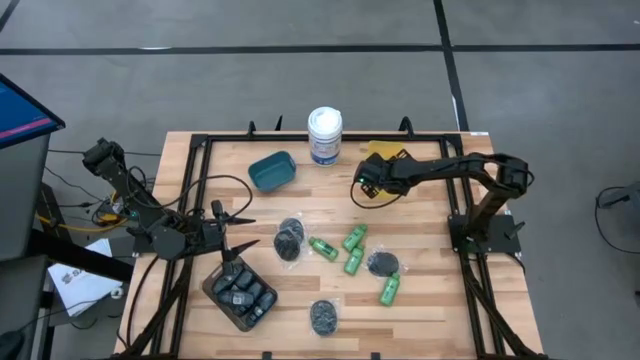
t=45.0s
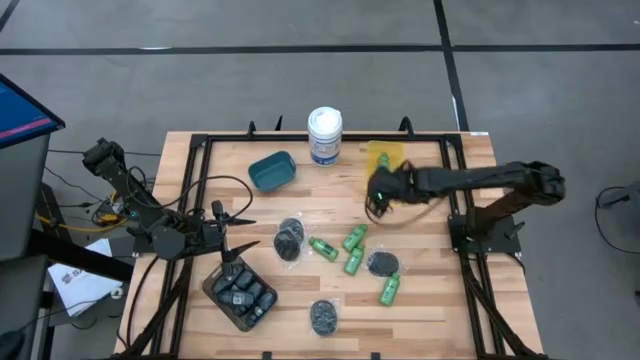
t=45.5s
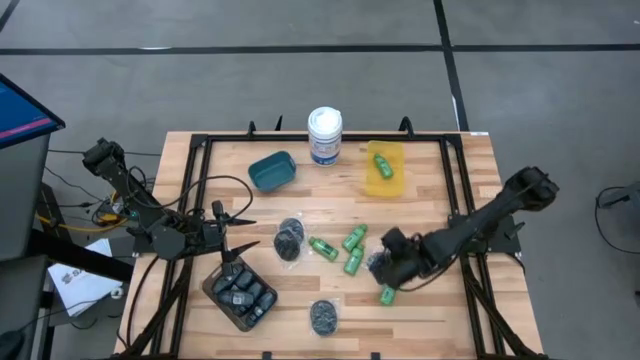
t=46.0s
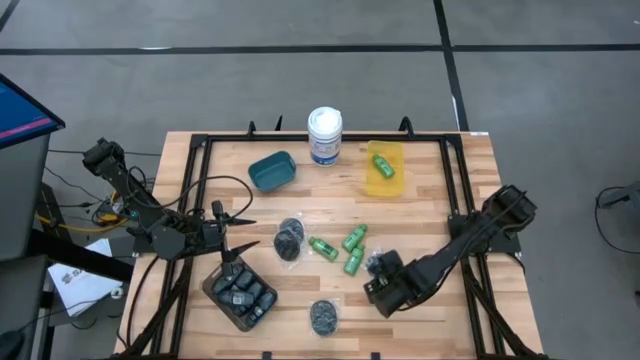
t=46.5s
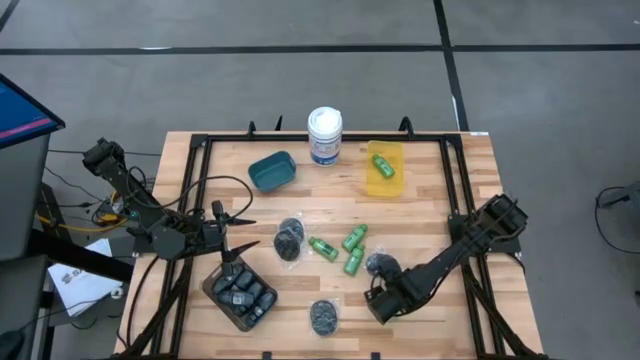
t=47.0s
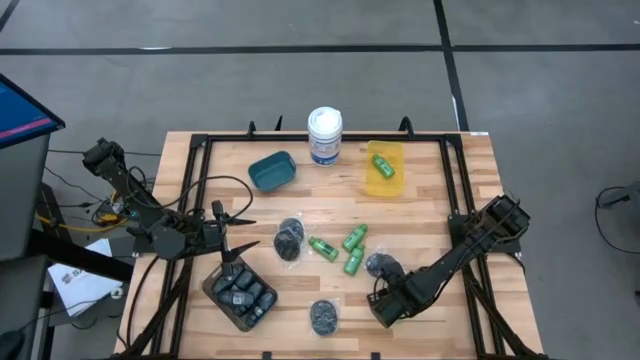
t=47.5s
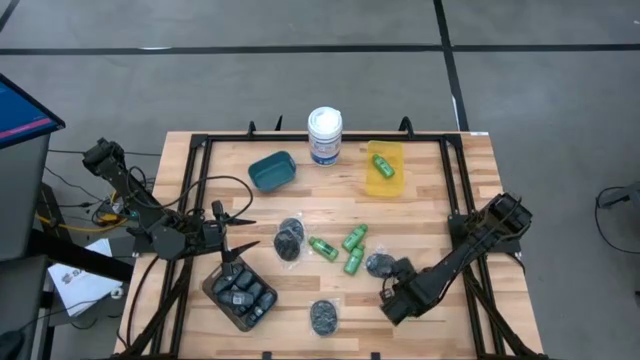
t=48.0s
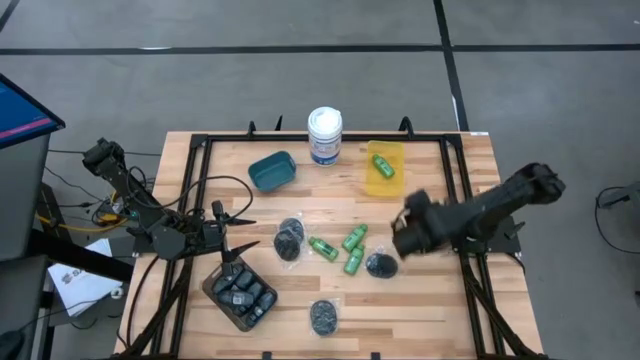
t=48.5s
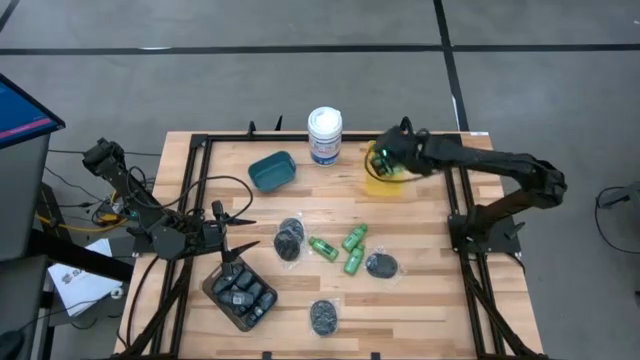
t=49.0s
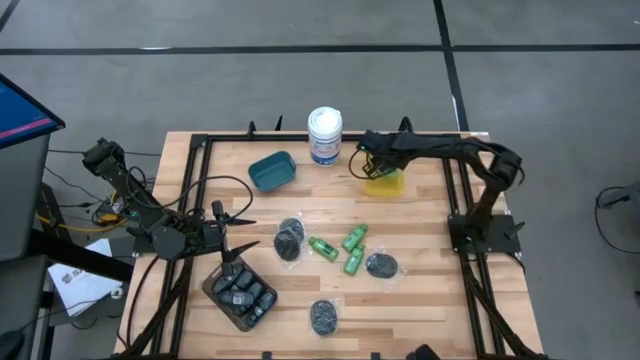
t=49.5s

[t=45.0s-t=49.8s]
Task: Pick & Place Travel size toiletries
Put the green shampoo bottle into the yellow bin

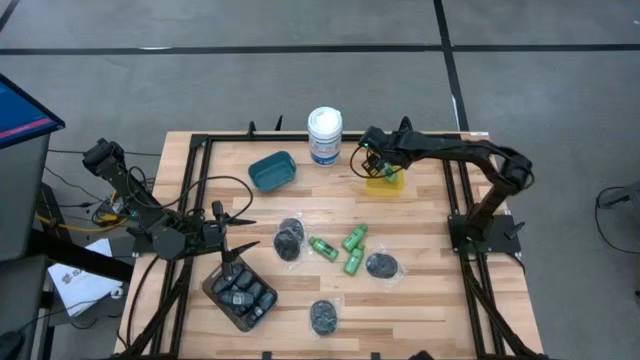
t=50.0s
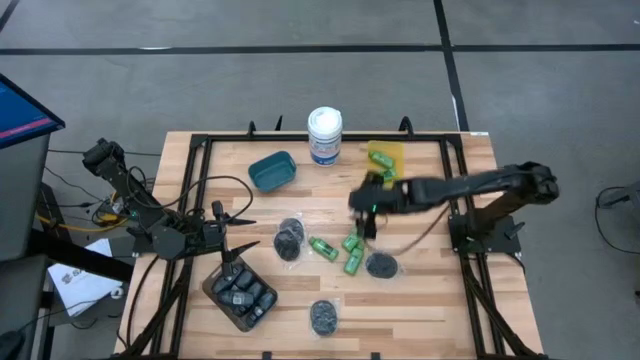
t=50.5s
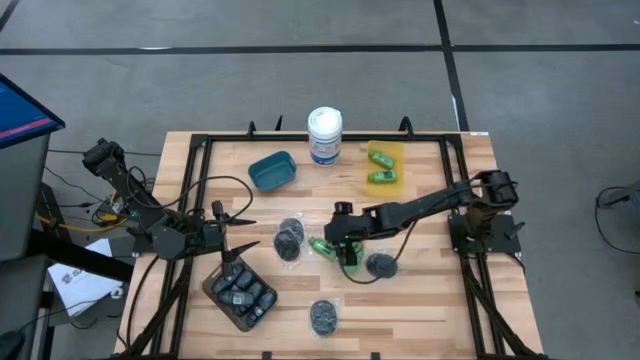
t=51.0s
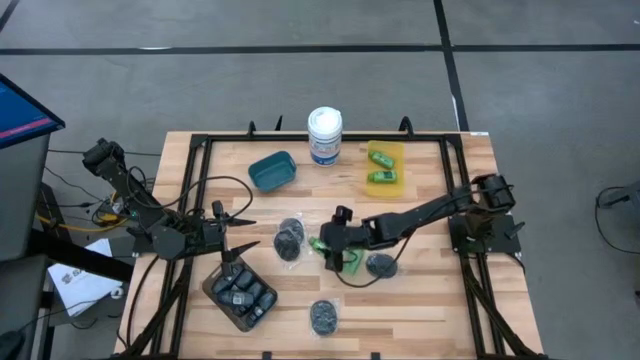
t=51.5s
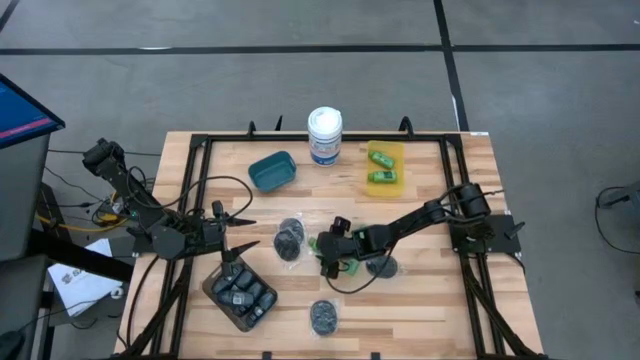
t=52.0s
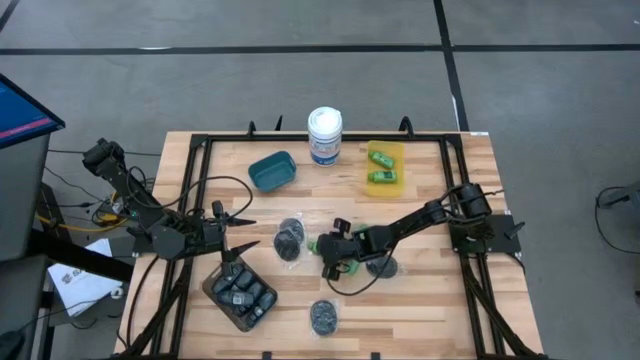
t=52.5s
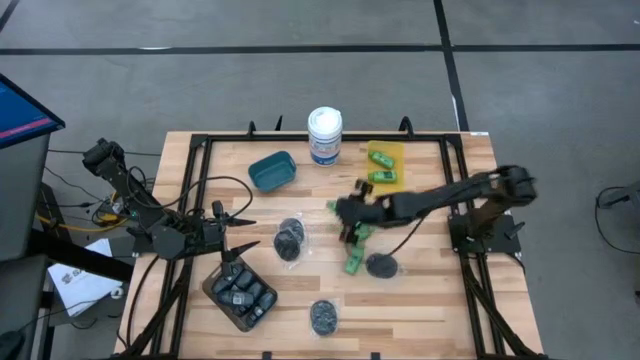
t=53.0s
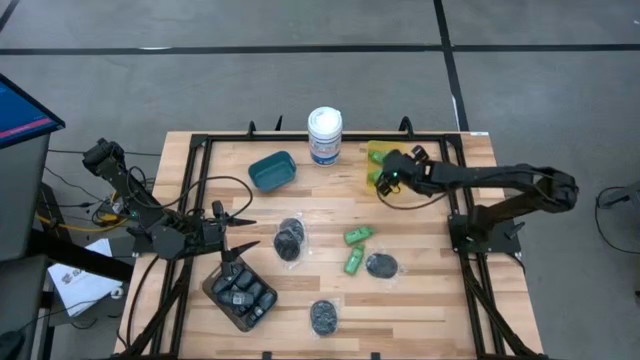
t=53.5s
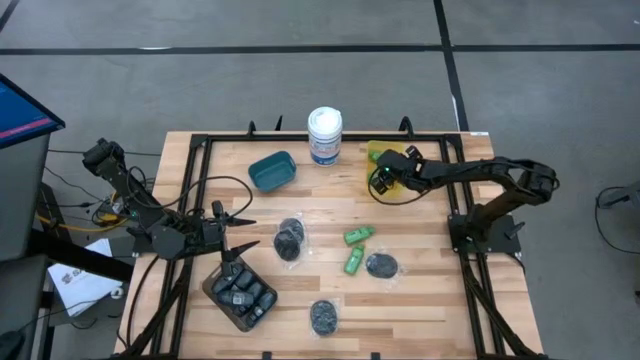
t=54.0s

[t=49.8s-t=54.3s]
Put the green shampoo bottle into the yellow bin

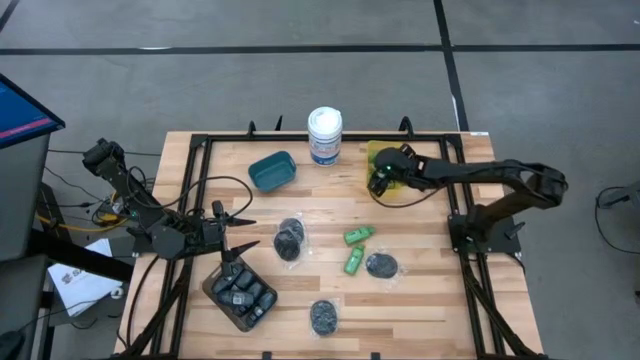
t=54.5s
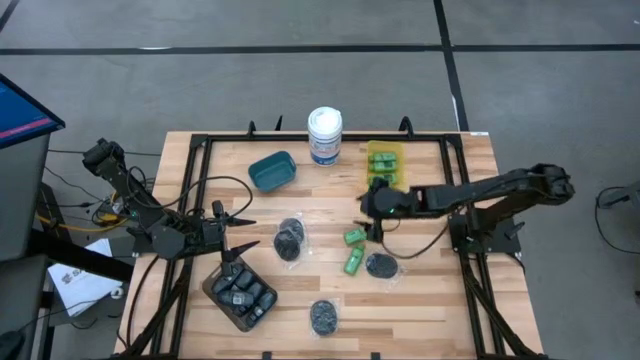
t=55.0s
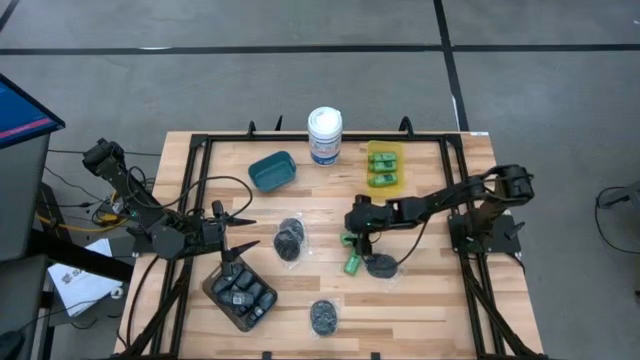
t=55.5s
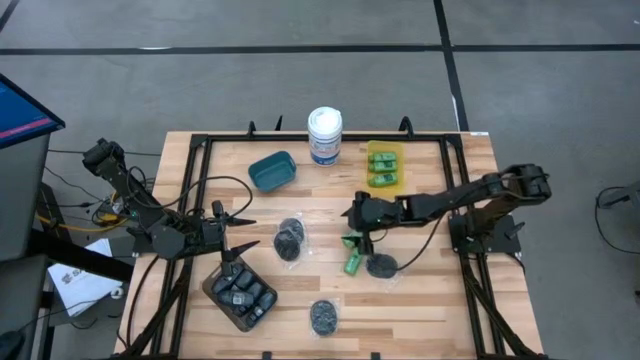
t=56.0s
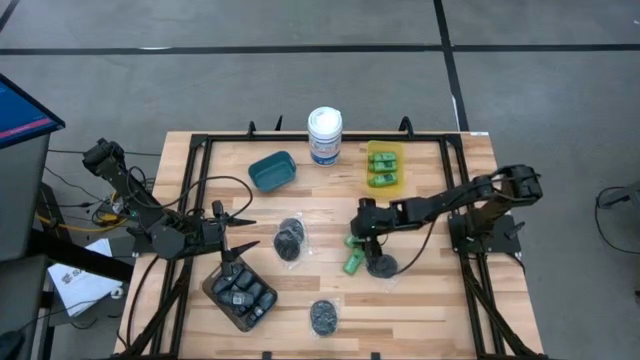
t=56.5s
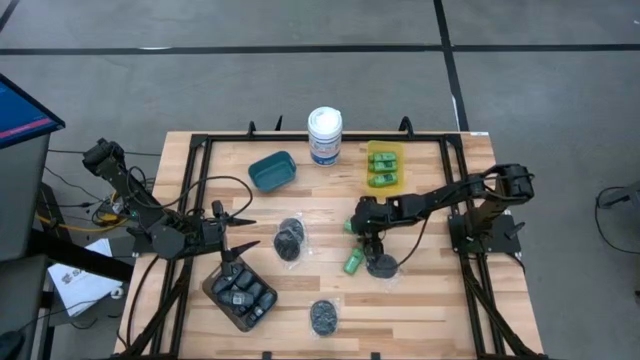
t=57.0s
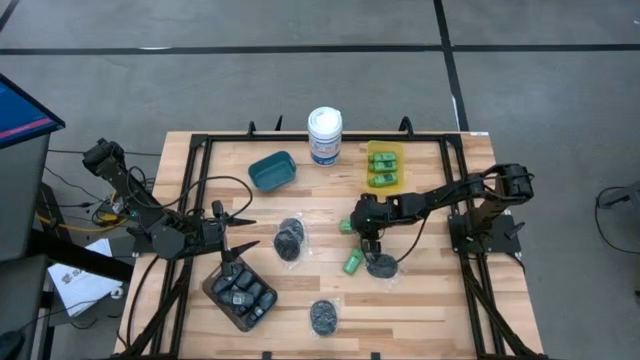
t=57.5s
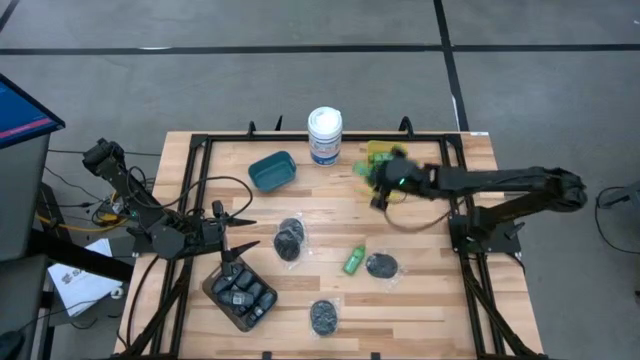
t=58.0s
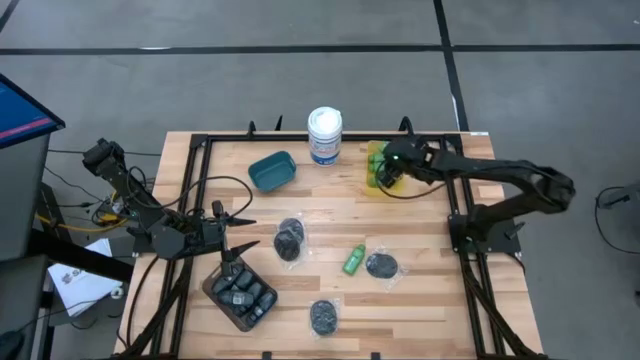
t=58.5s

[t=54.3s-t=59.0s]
Put the green shampoo bottle into the yellow bin

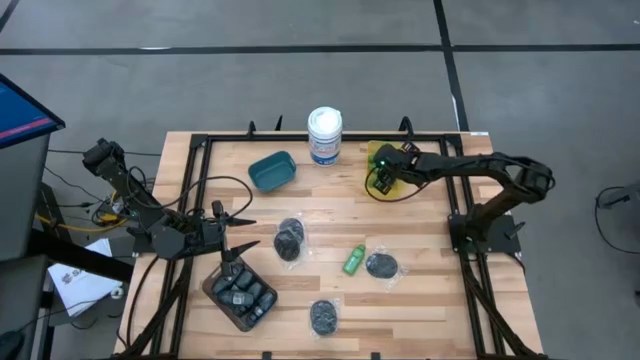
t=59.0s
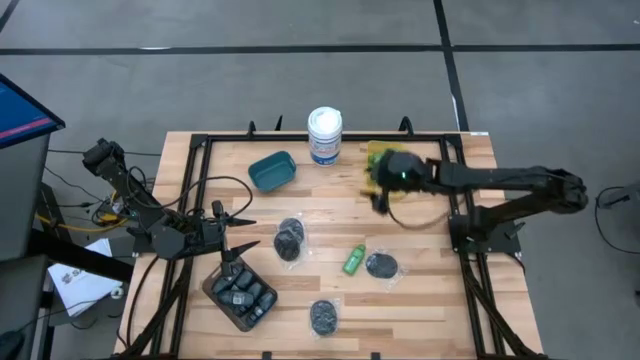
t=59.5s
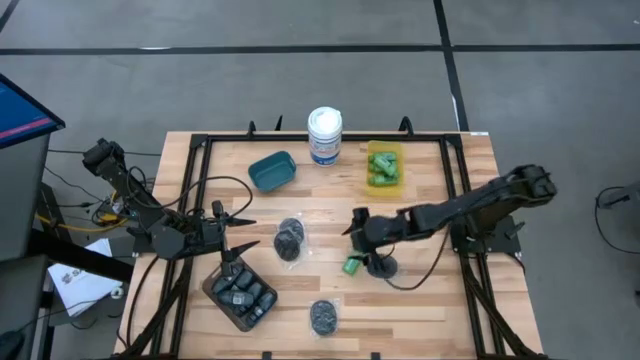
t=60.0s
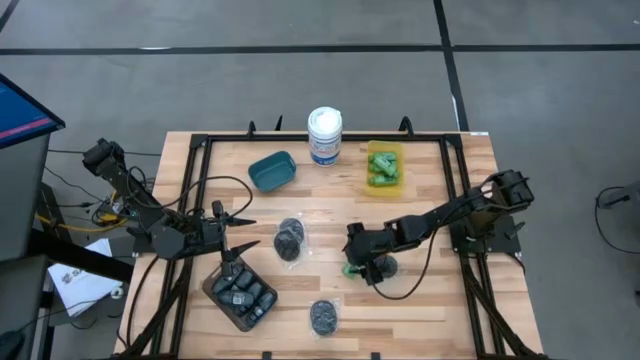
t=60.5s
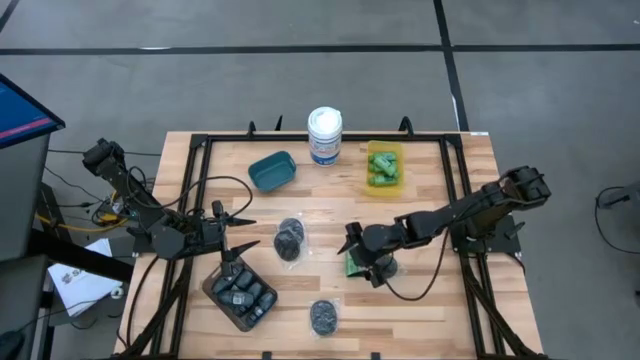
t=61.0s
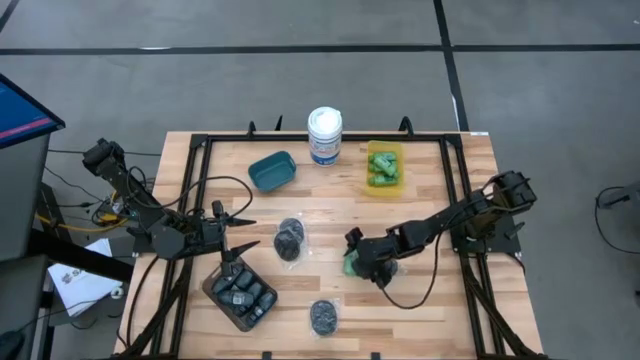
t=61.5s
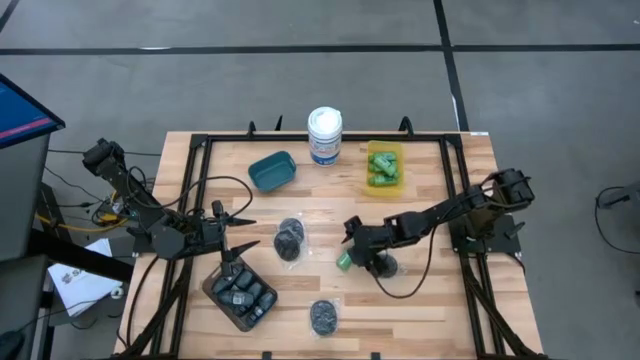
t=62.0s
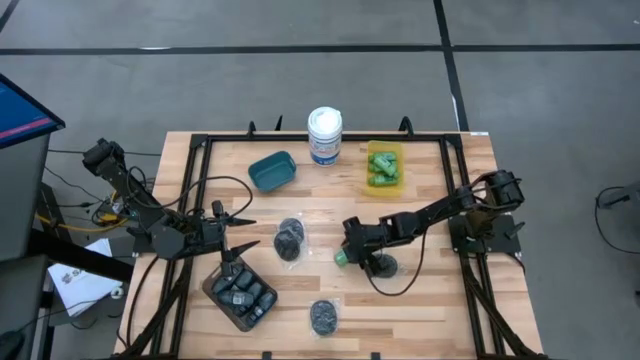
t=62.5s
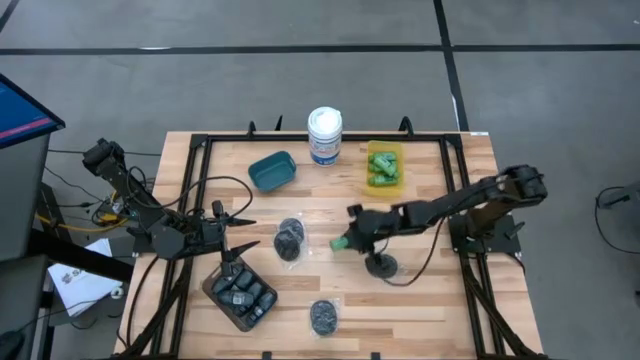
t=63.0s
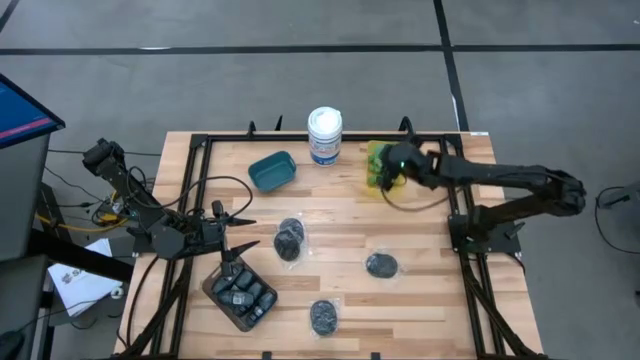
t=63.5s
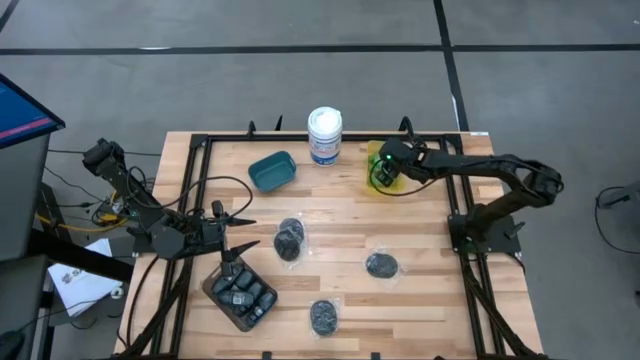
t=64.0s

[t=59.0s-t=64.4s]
Put the green shampoo bottle into the yellow bin

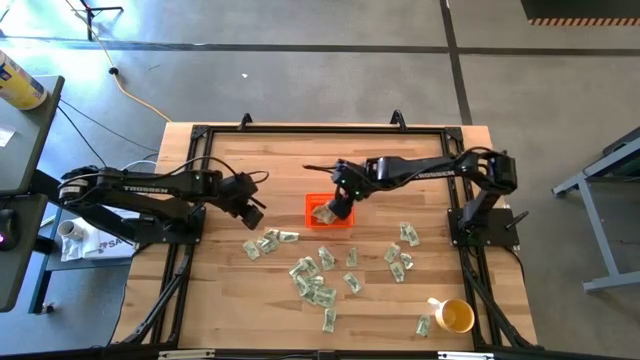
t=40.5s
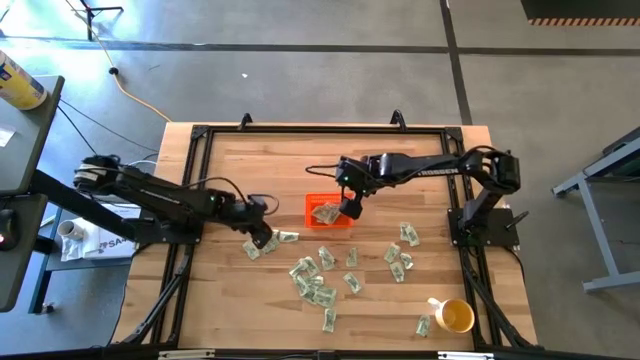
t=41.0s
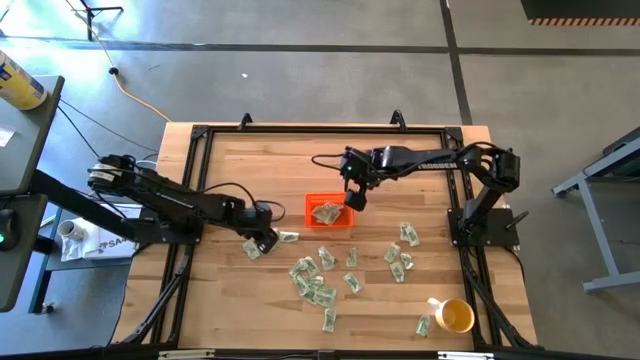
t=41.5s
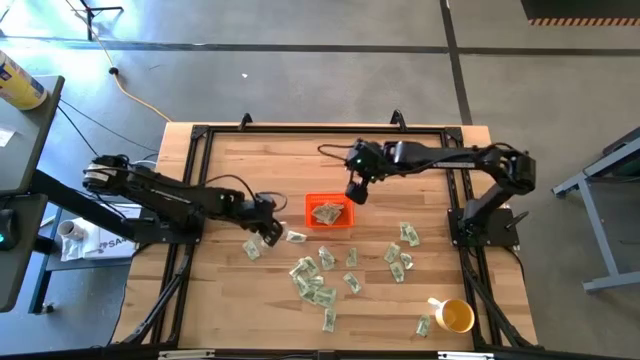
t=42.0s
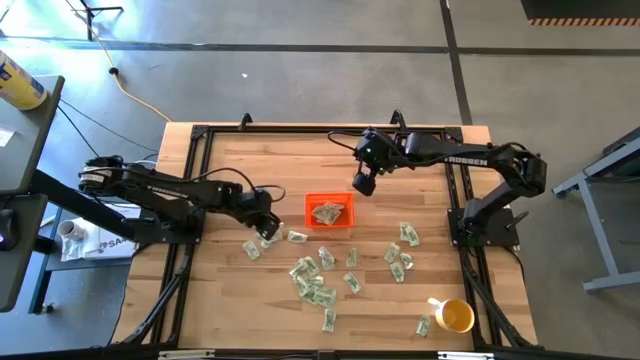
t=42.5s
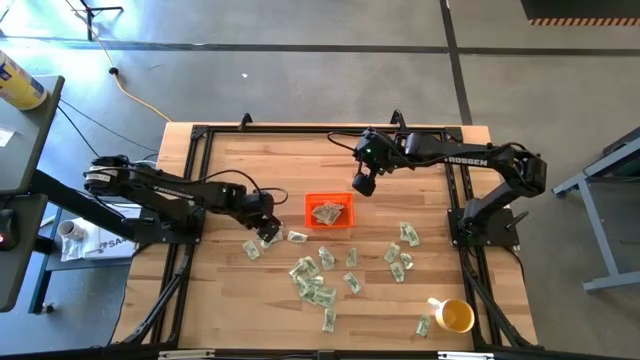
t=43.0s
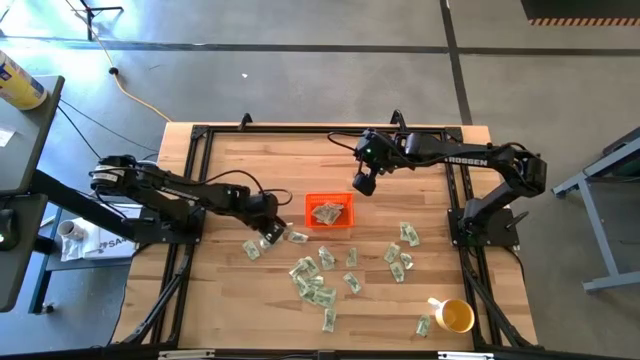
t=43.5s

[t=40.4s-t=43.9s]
Task: Pick and place Stevia / Truvia into bins
Put the stevia packet into the orange bin
